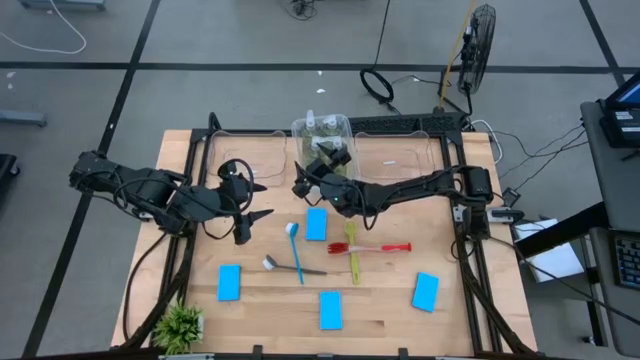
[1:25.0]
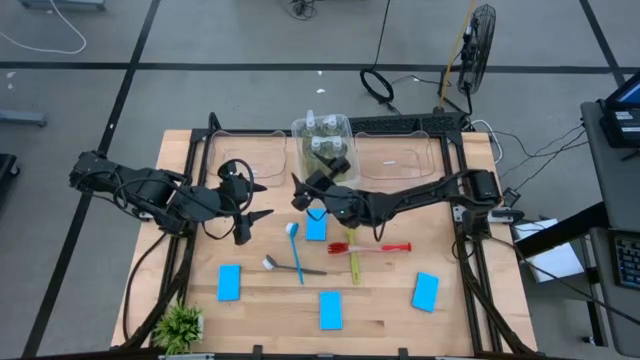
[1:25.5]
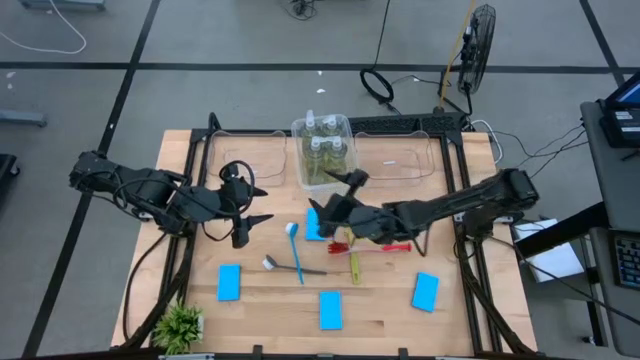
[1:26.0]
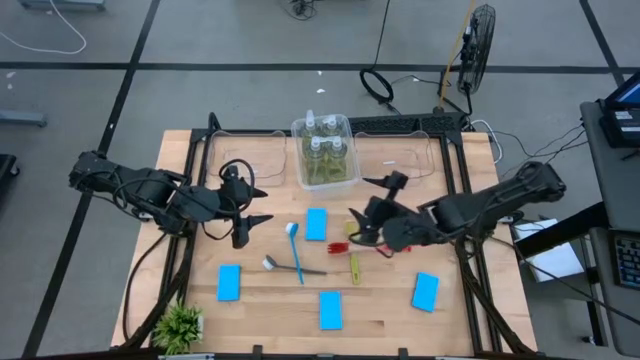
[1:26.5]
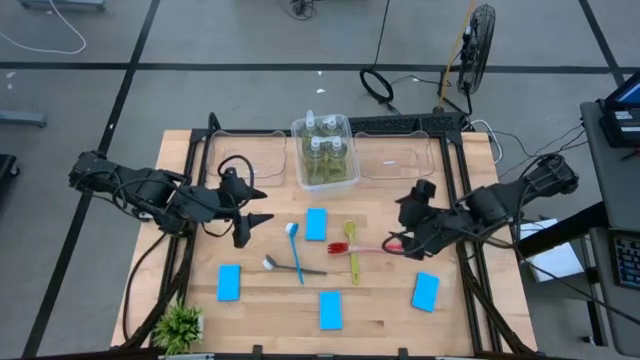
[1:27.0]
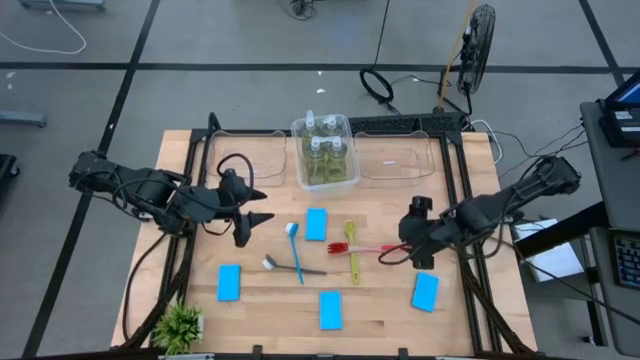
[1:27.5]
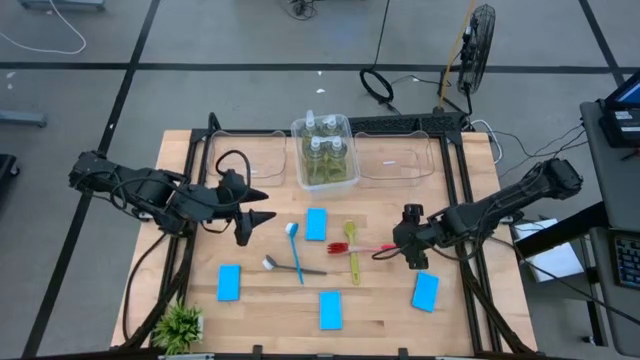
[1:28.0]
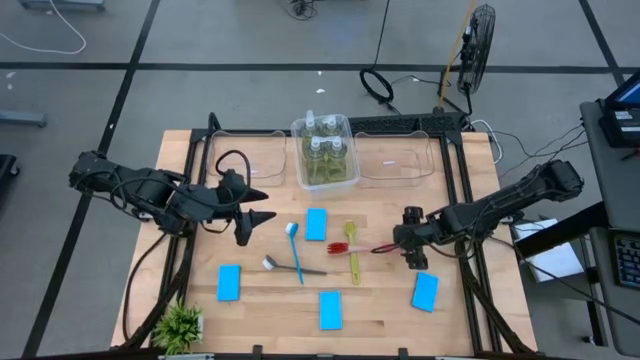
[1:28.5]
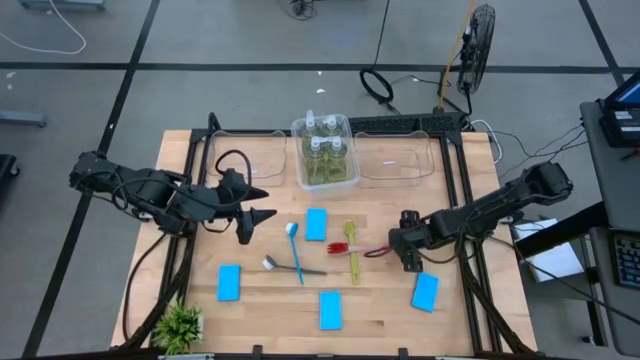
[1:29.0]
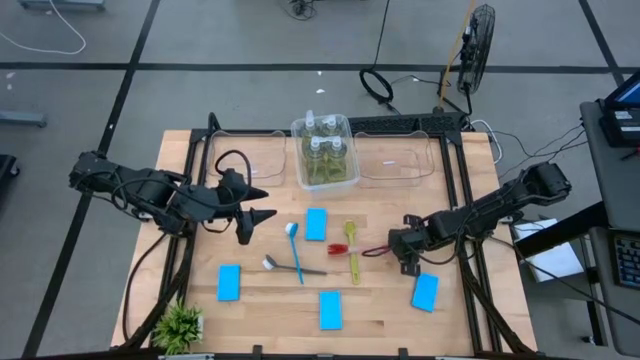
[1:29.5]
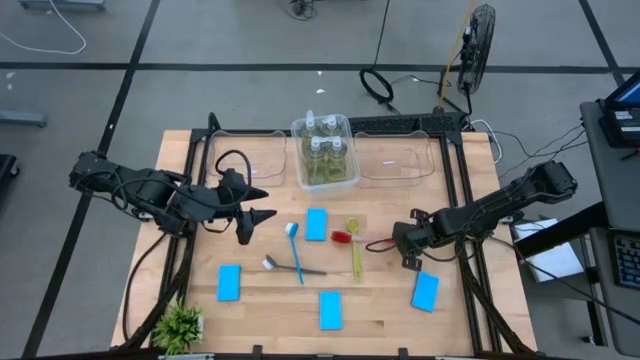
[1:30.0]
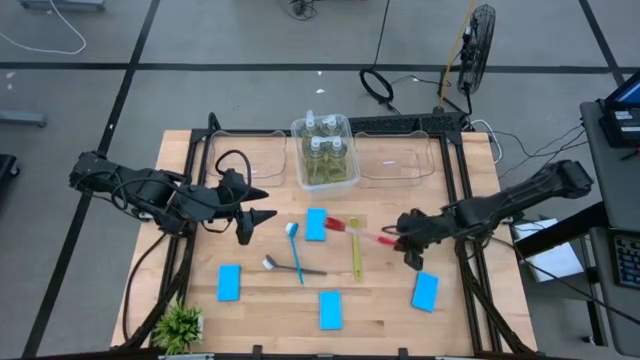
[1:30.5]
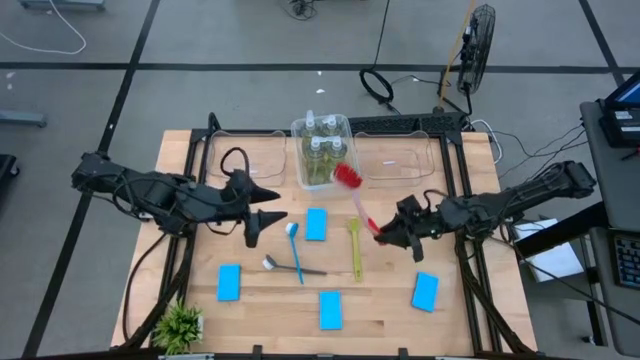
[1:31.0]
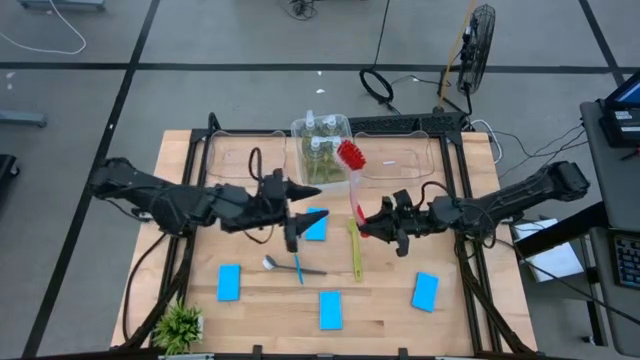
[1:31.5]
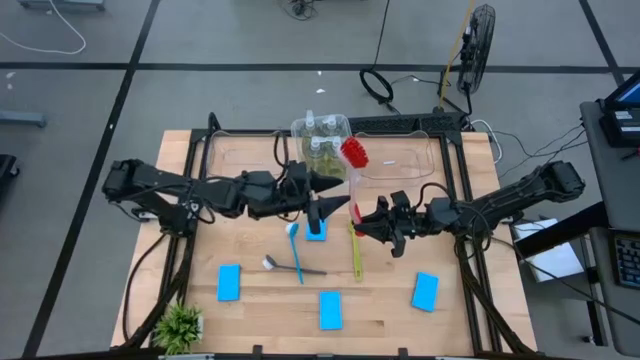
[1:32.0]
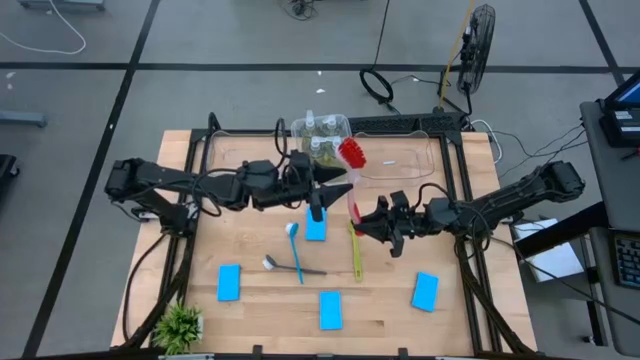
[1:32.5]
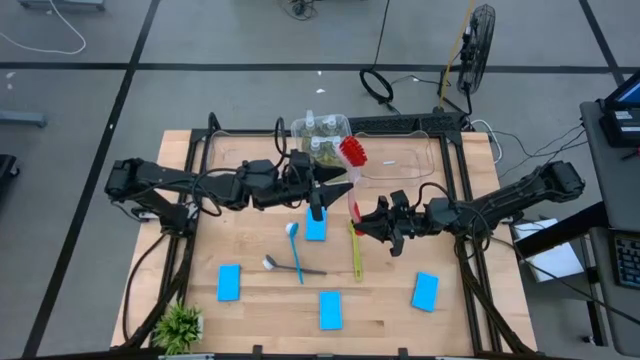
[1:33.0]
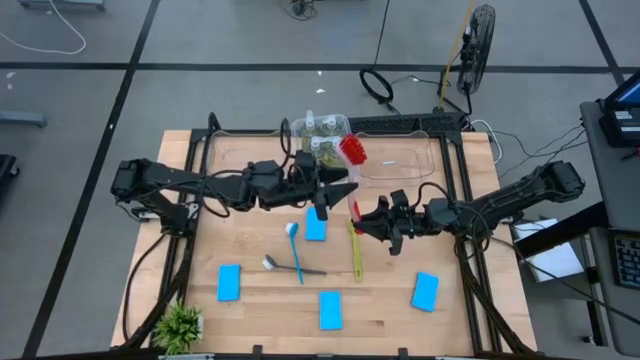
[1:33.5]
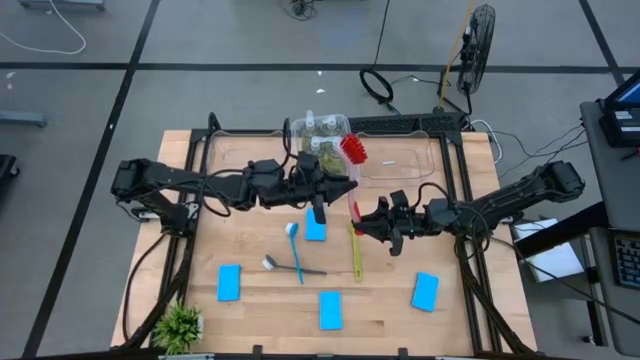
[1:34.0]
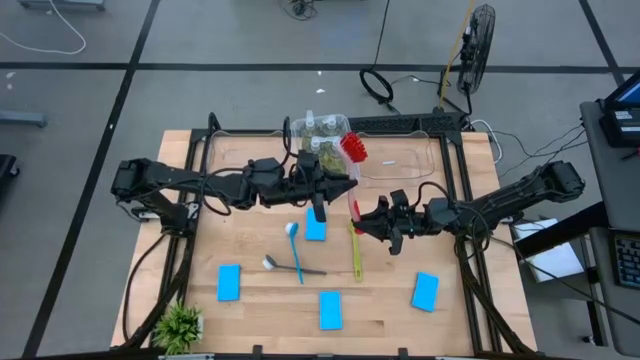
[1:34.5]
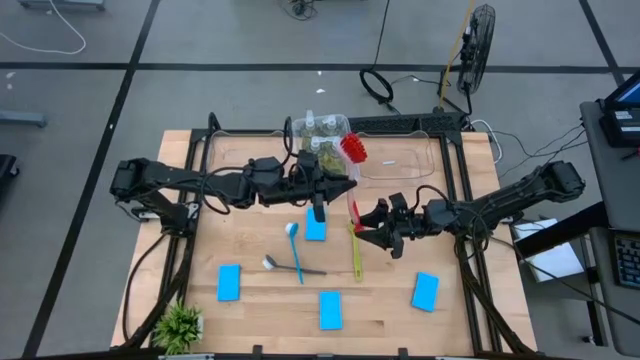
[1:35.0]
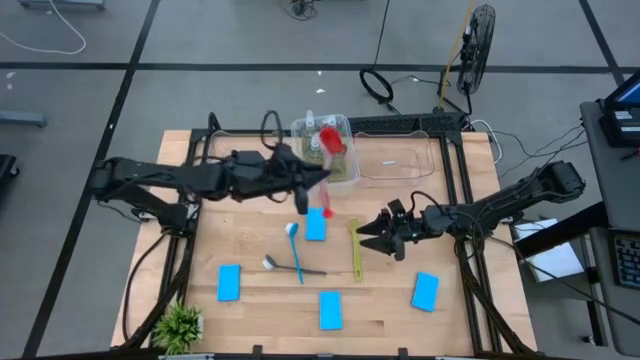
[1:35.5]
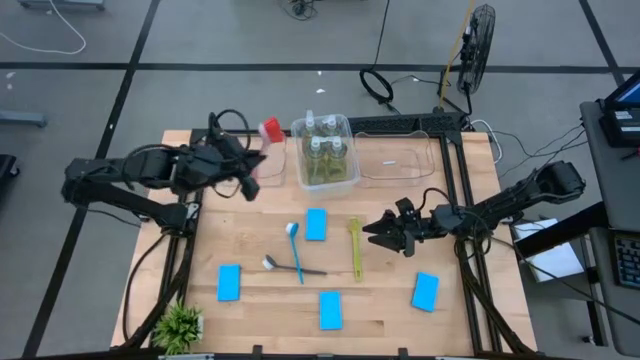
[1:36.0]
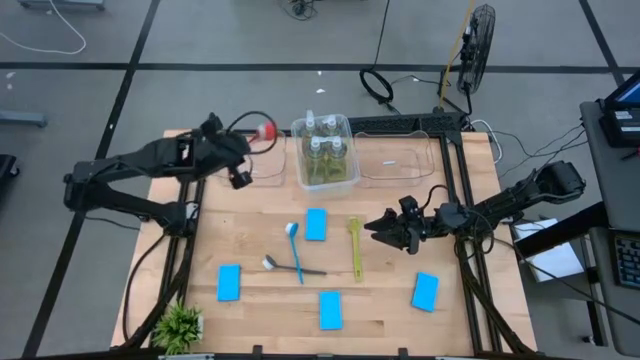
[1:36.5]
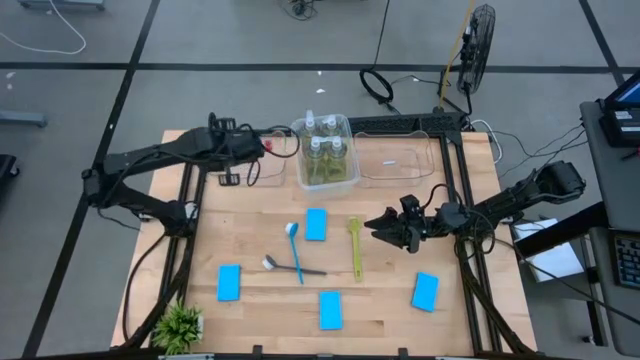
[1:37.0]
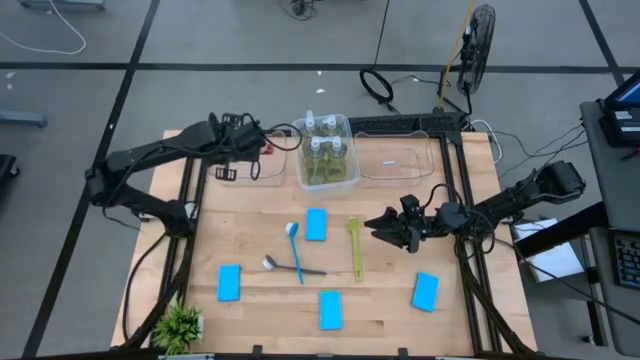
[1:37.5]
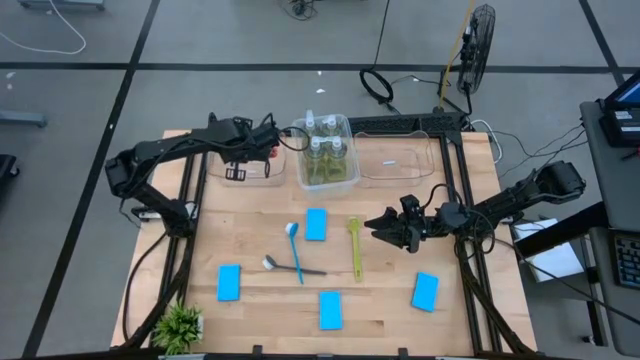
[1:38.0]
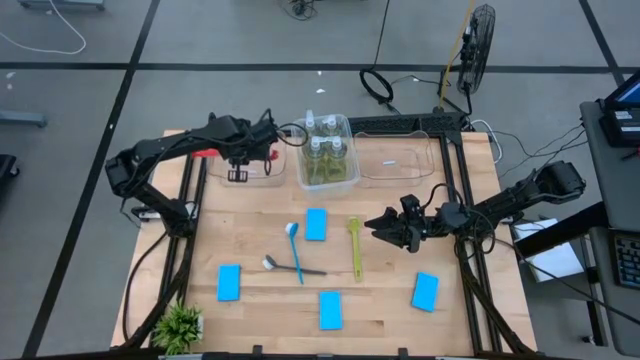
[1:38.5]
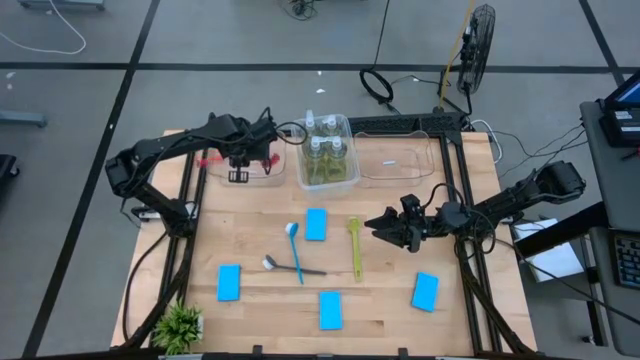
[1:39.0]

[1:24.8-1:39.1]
Task: Pick & Place Kitchen Sink Supplies
Put the red dish brush into the left transparent bin

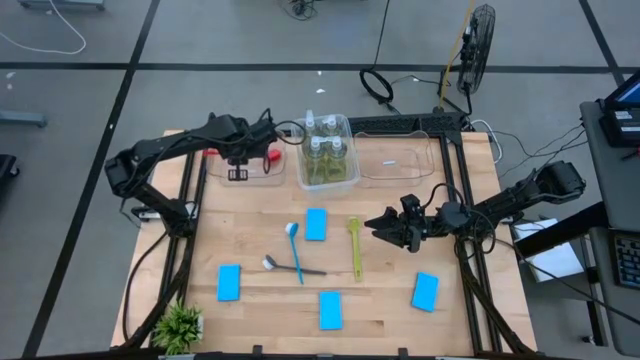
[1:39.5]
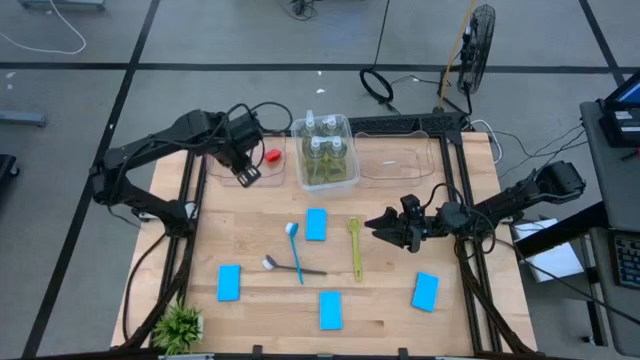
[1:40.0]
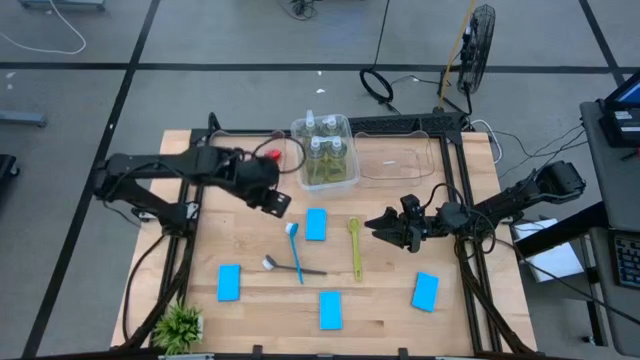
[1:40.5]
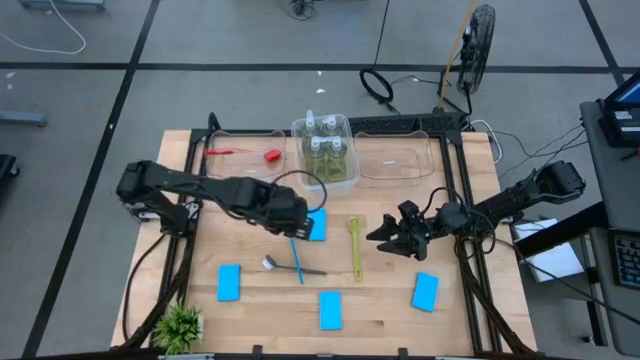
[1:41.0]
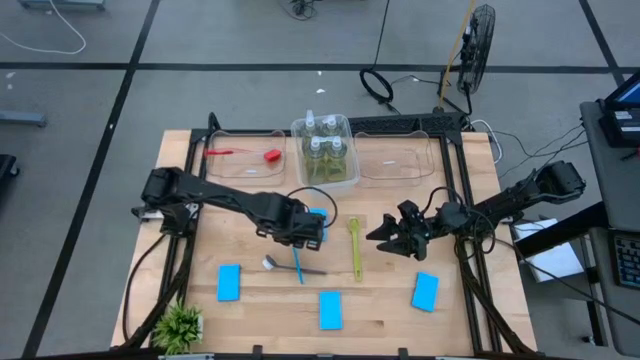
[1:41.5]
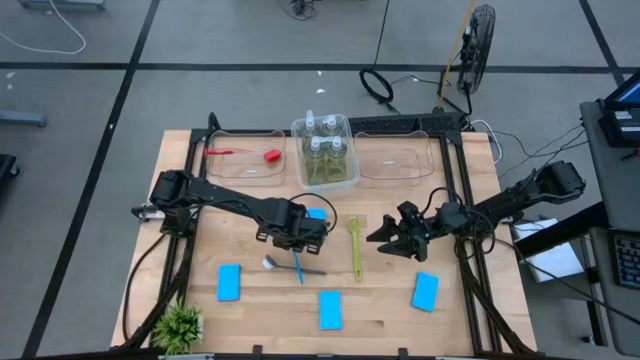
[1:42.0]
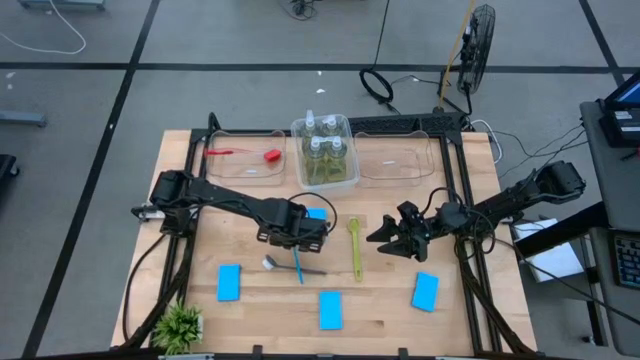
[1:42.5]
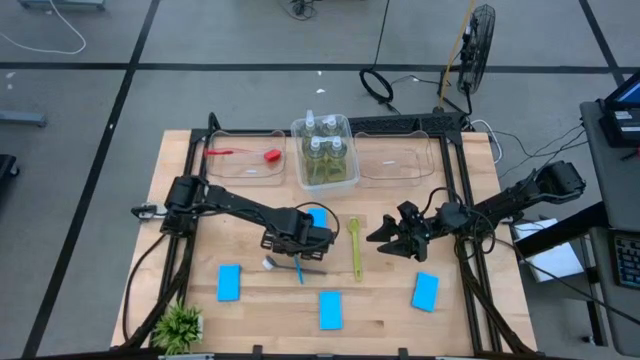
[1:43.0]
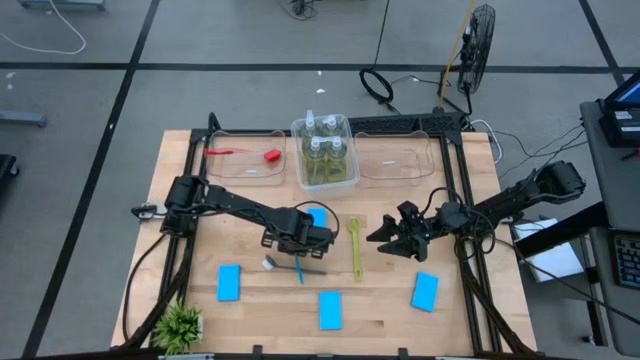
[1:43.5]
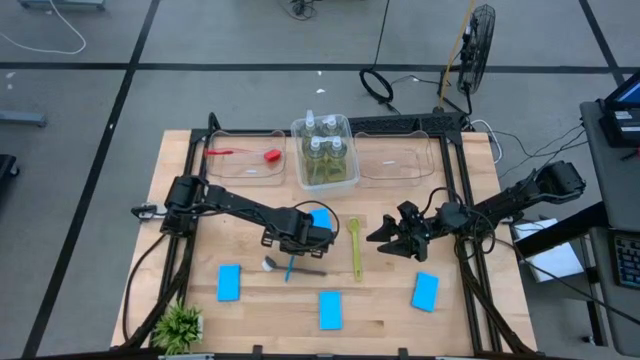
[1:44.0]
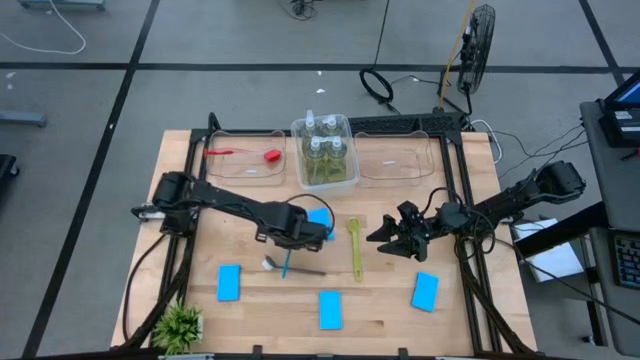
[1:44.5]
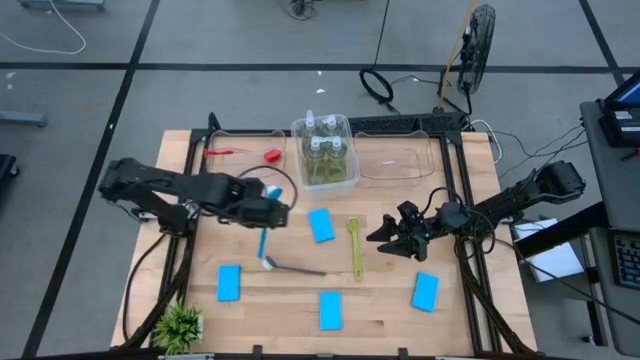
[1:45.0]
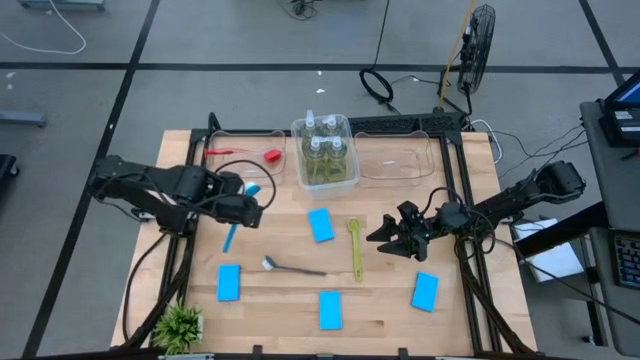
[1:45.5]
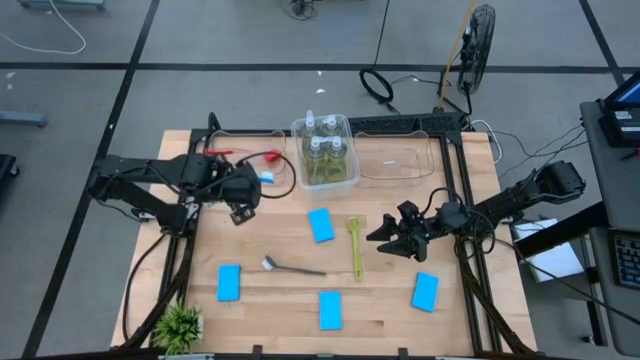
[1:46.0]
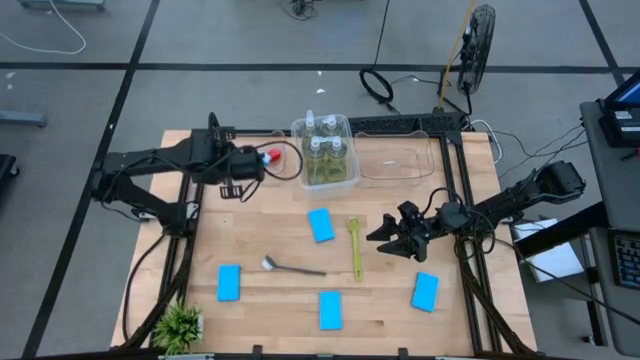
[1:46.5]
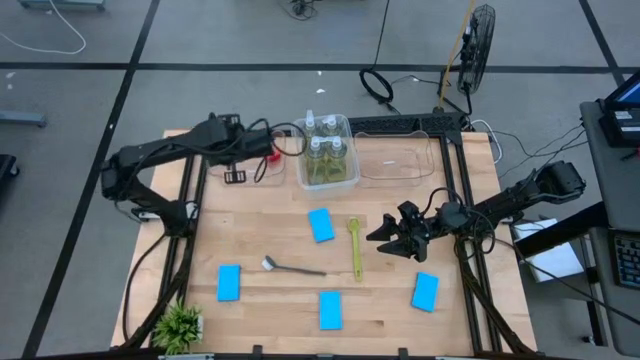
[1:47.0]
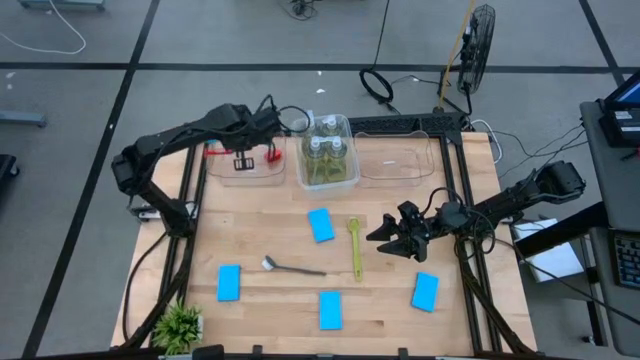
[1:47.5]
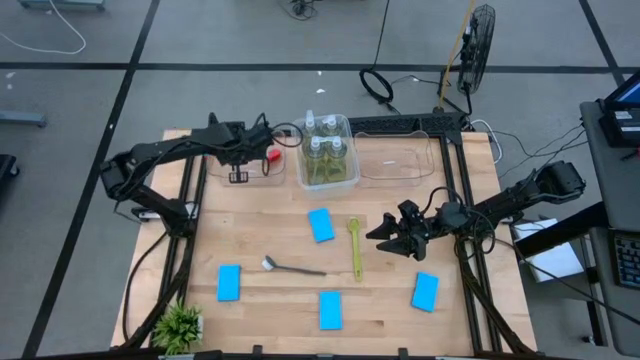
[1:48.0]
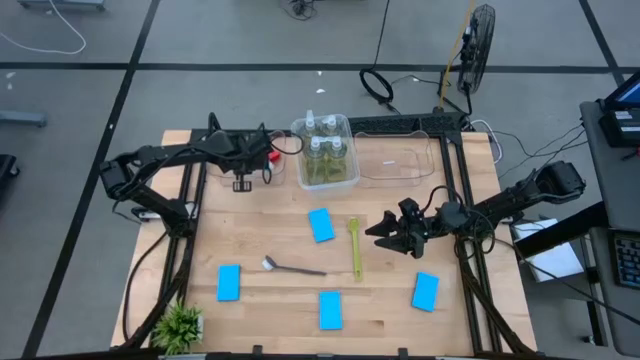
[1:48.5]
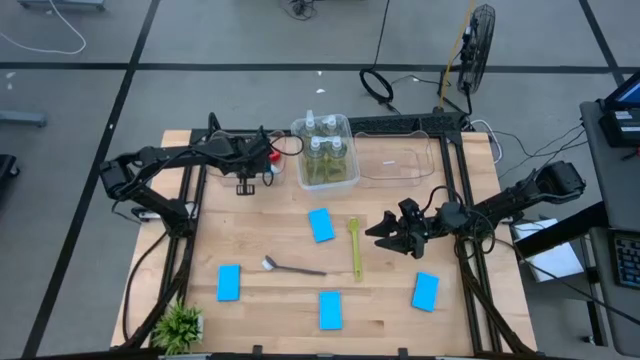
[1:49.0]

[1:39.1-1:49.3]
Put the blue dish brush into the left transparent bin
